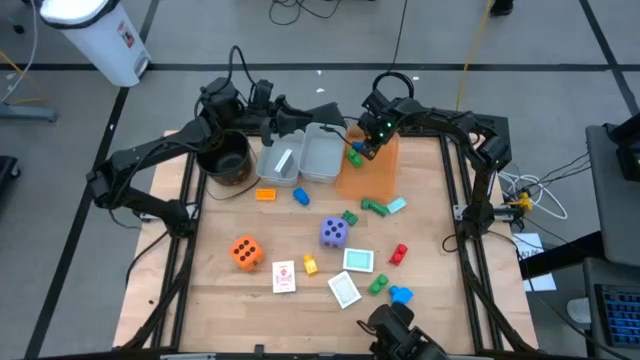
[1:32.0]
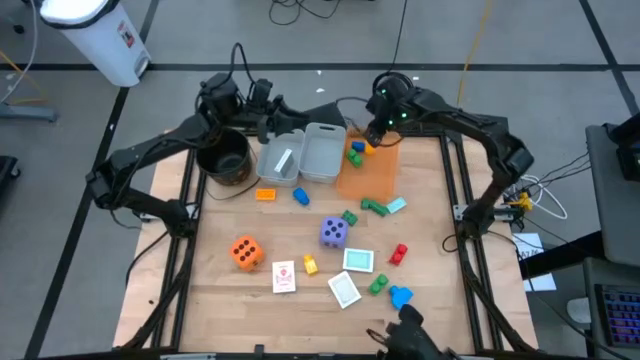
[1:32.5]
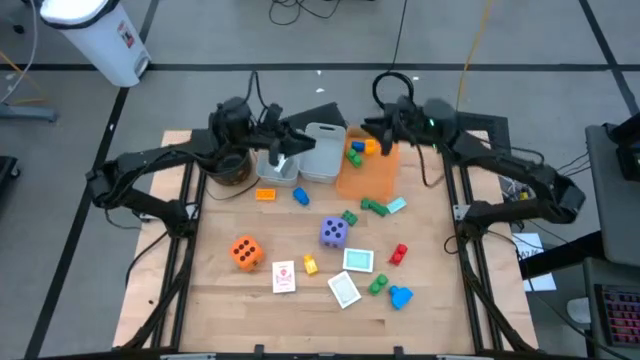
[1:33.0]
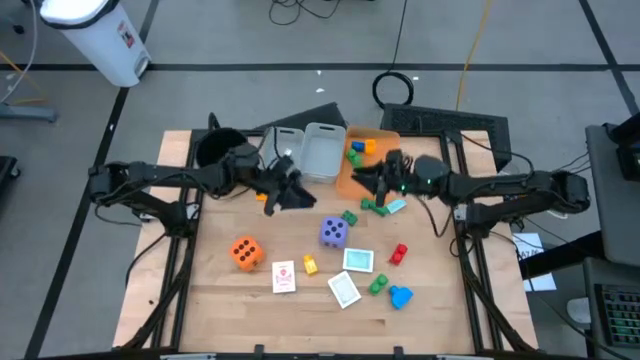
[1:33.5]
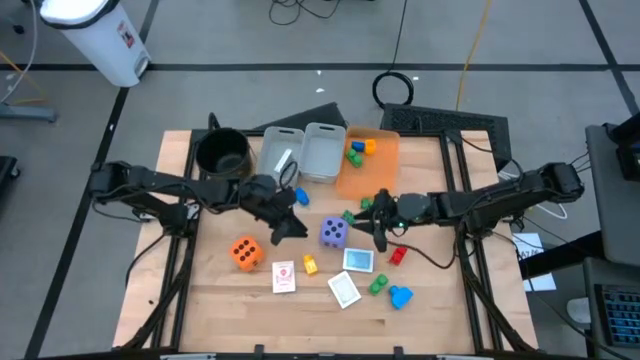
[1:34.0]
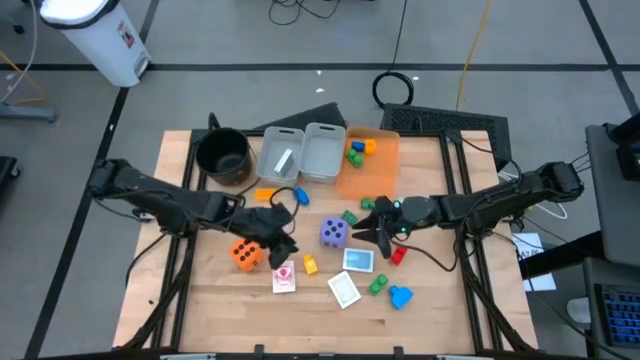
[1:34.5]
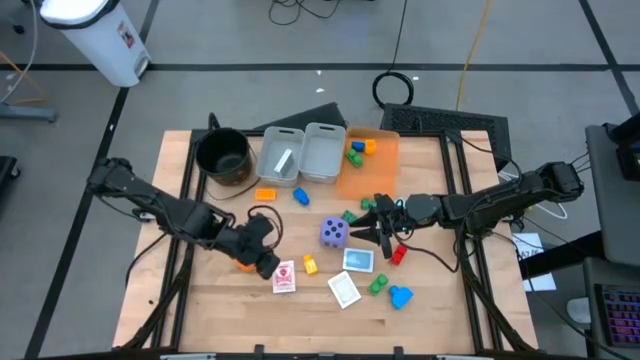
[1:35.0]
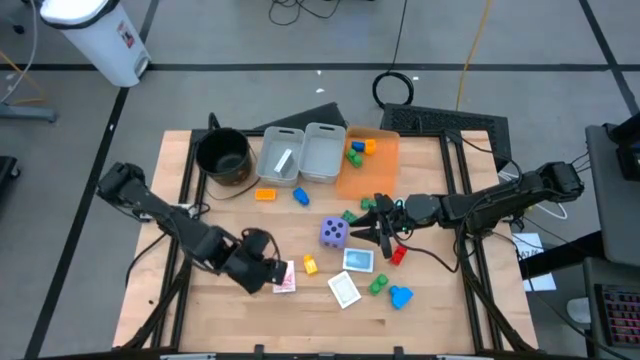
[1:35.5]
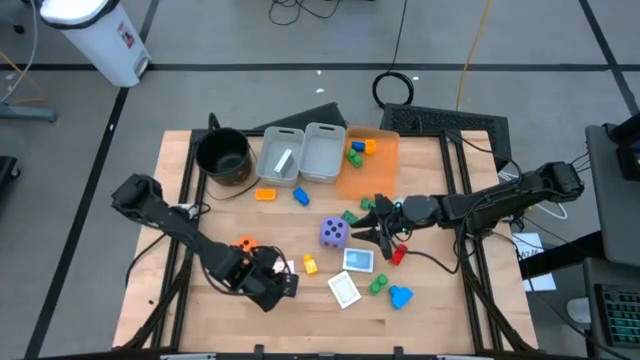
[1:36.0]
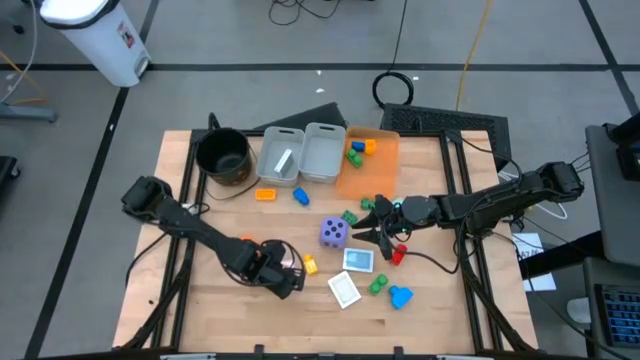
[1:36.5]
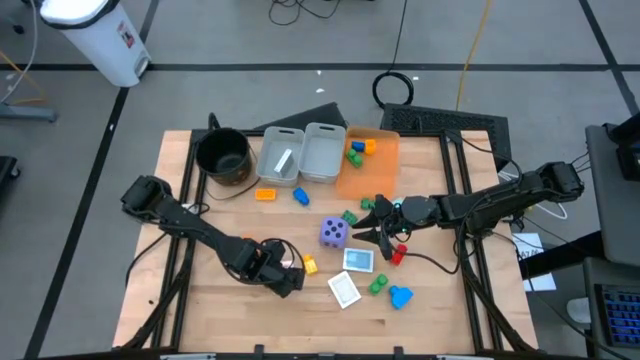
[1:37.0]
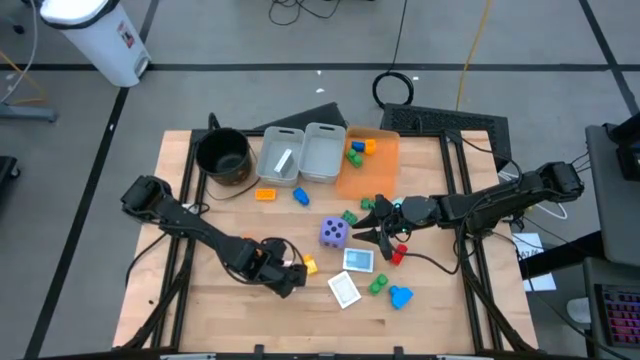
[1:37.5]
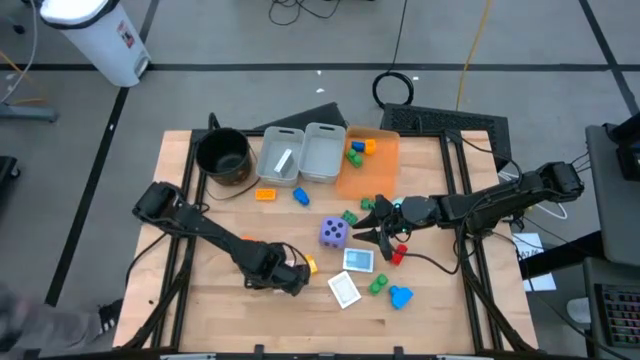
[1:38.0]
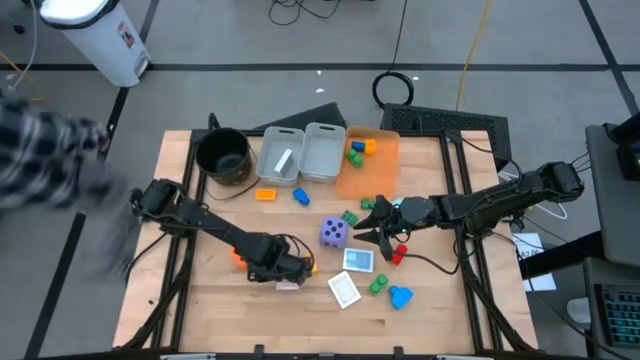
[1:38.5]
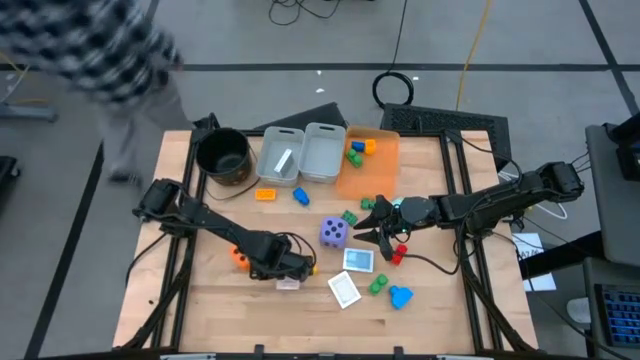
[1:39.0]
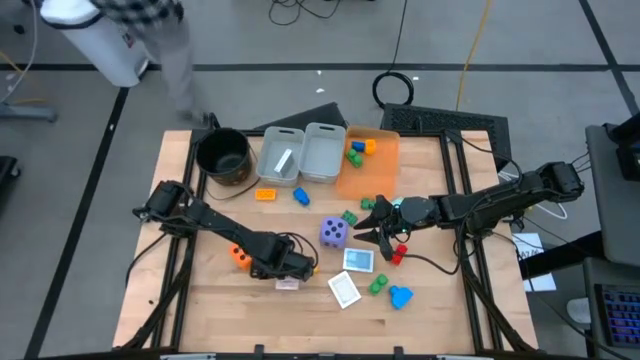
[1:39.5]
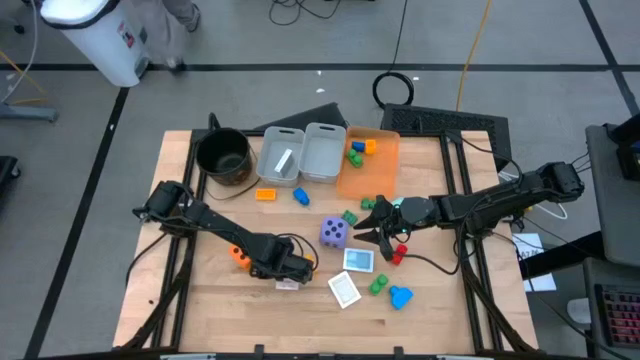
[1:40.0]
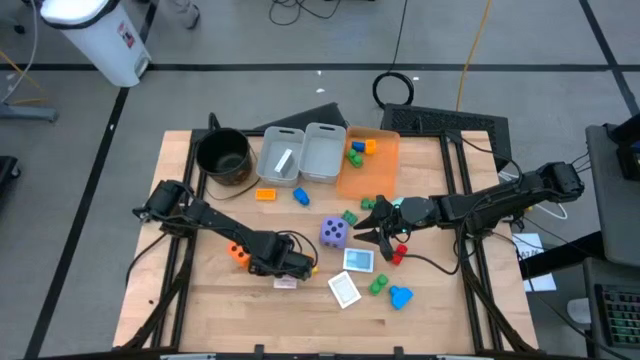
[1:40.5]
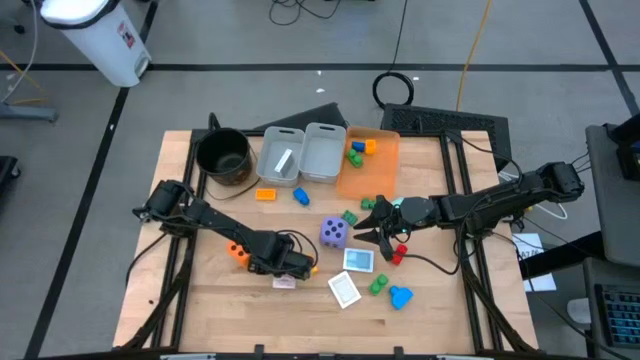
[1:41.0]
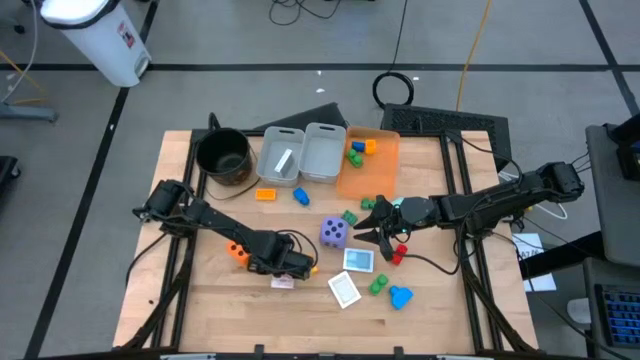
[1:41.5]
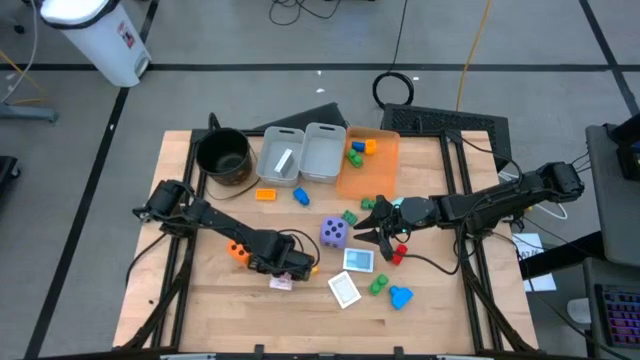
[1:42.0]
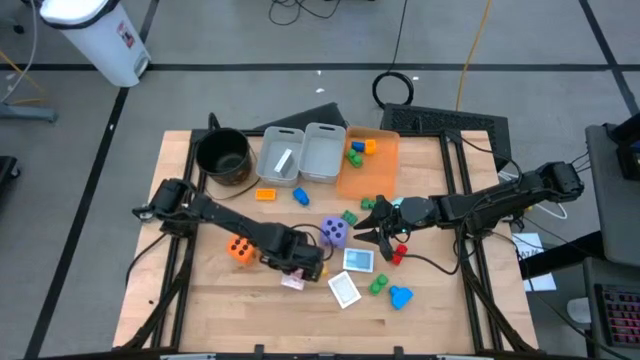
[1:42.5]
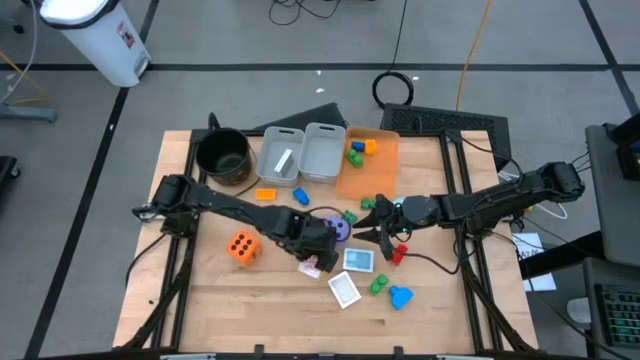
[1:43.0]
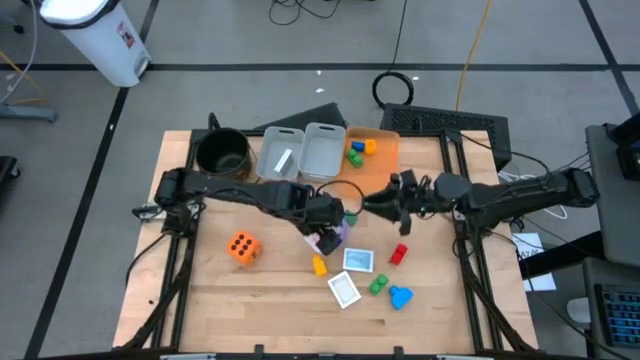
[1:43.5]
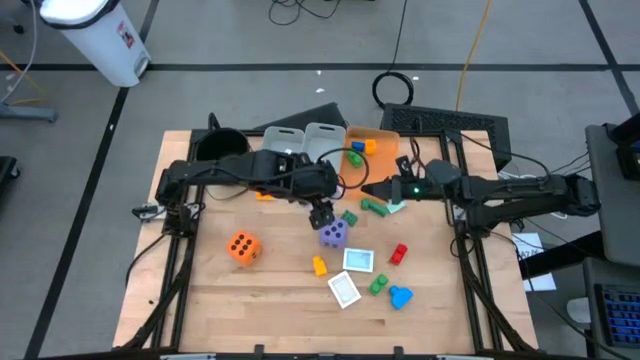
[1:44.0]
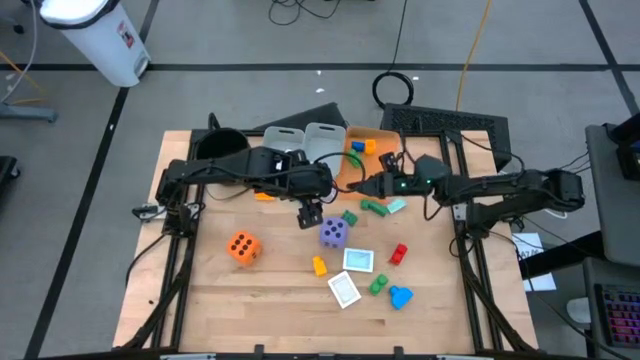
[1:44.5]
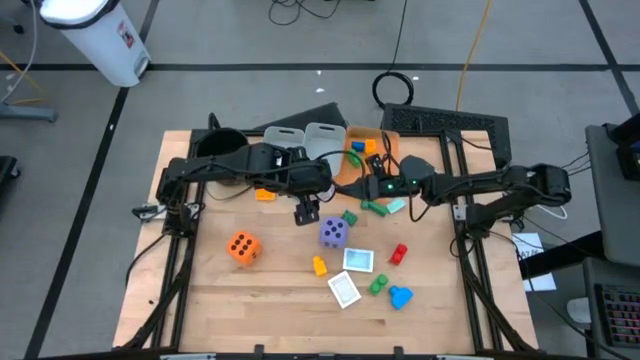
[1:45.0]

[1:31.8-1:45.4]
Task: Pick & Place Toys
Put the red deck of cards into the left gray bin
